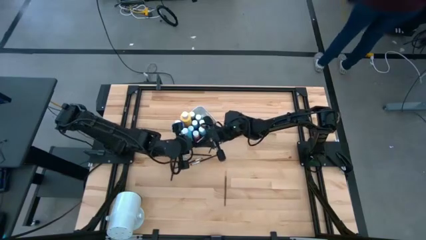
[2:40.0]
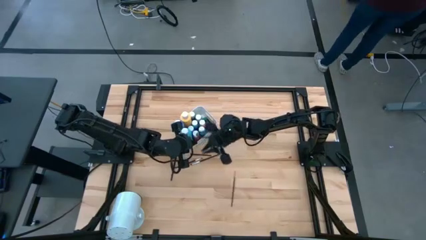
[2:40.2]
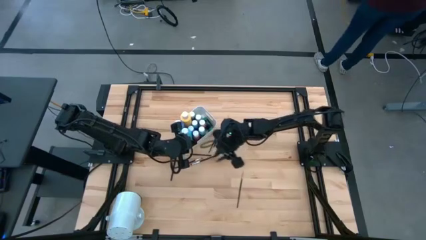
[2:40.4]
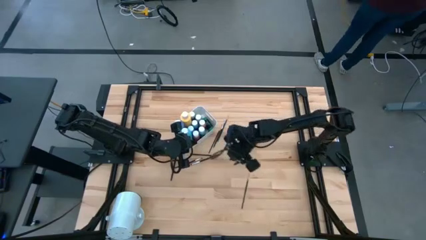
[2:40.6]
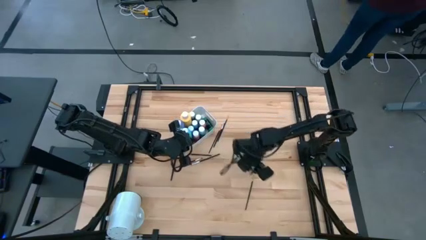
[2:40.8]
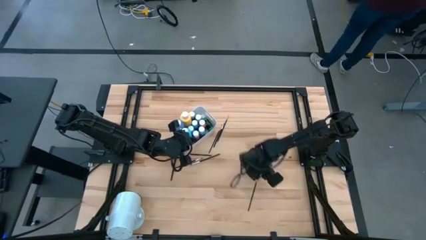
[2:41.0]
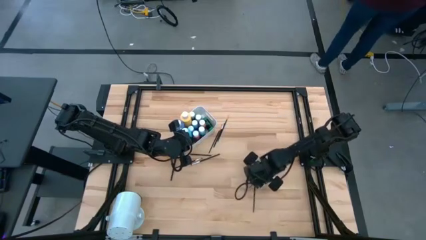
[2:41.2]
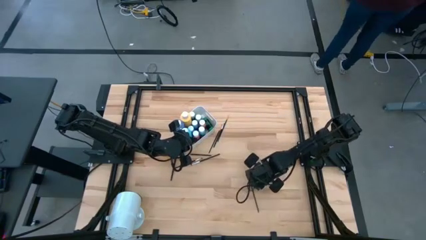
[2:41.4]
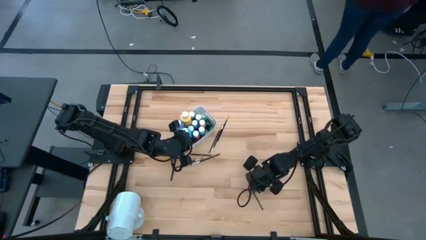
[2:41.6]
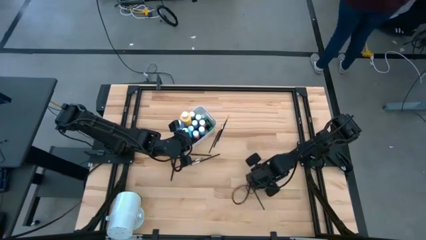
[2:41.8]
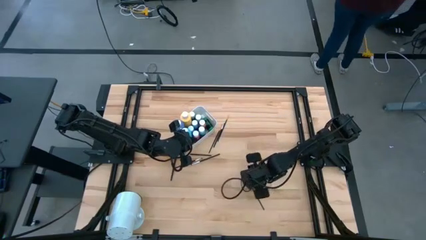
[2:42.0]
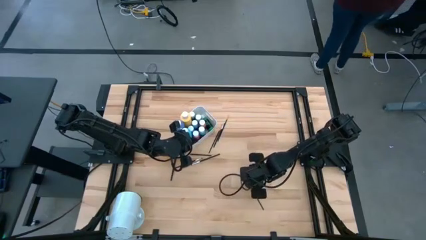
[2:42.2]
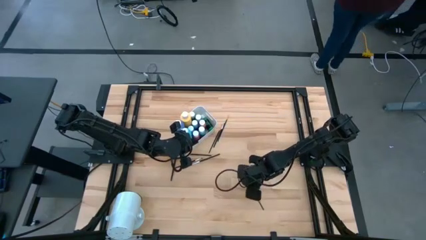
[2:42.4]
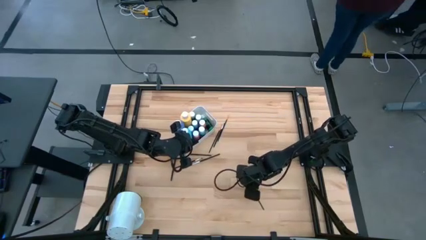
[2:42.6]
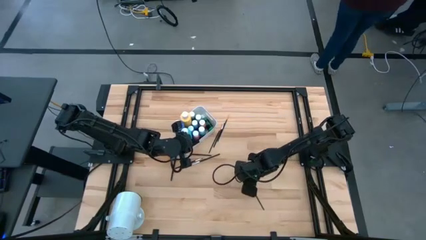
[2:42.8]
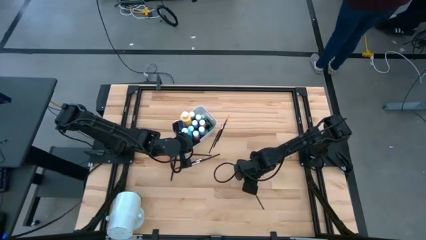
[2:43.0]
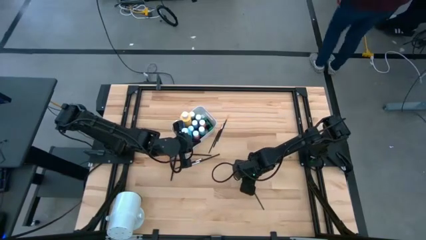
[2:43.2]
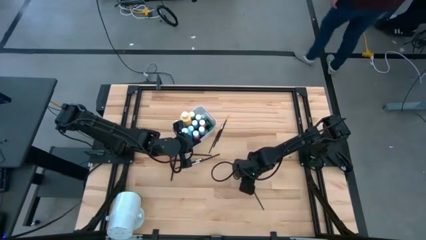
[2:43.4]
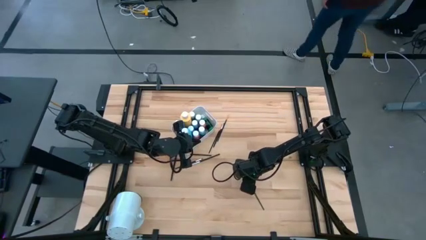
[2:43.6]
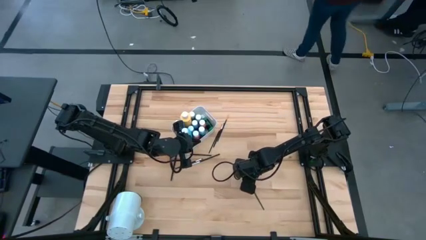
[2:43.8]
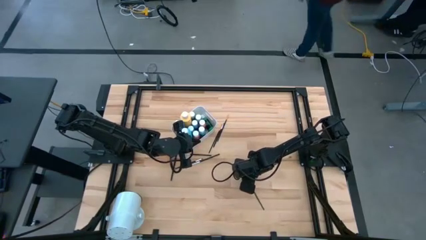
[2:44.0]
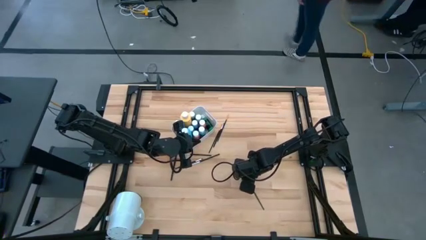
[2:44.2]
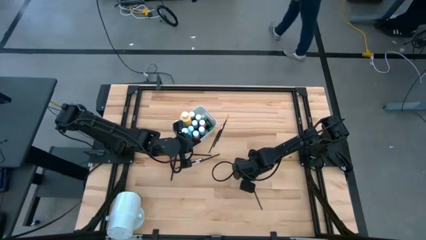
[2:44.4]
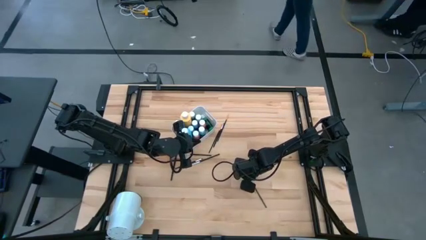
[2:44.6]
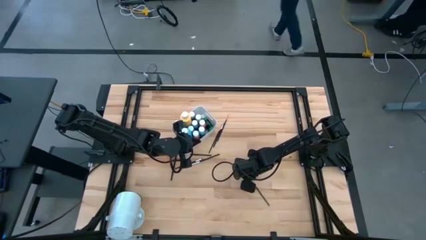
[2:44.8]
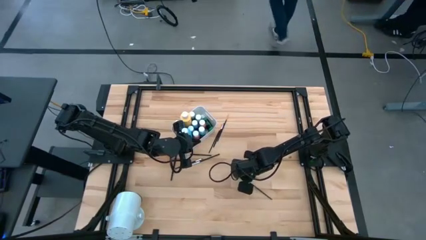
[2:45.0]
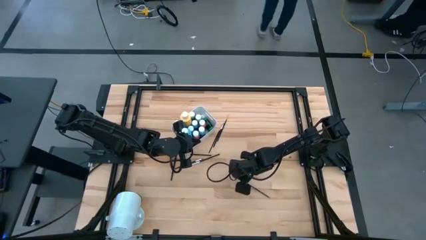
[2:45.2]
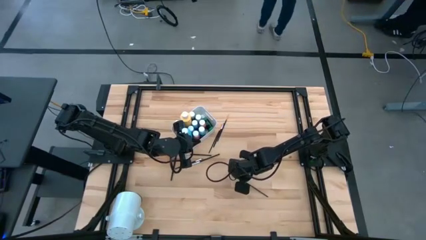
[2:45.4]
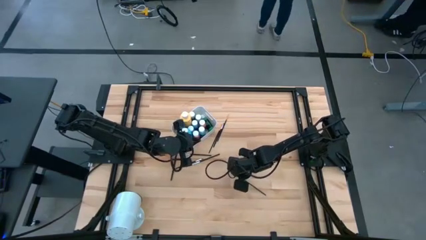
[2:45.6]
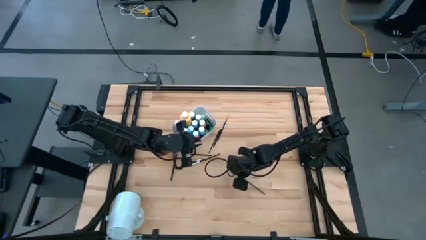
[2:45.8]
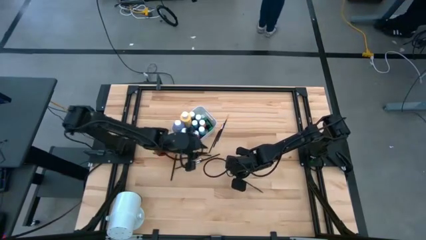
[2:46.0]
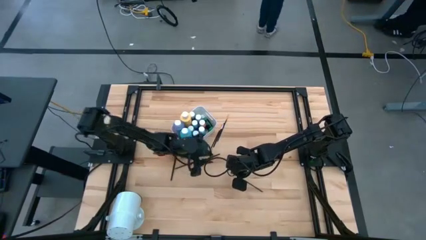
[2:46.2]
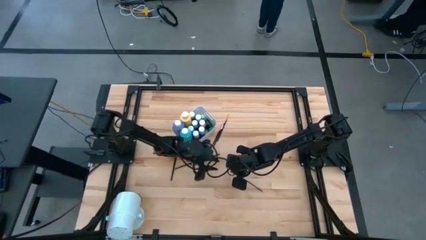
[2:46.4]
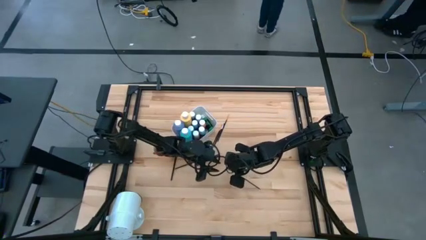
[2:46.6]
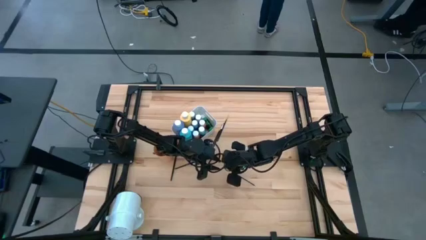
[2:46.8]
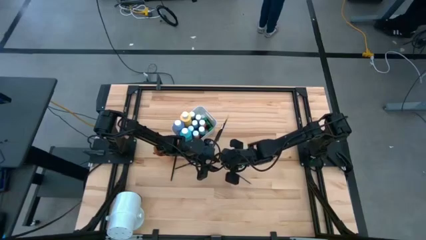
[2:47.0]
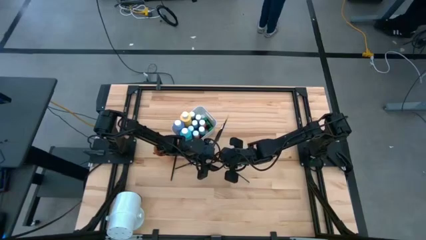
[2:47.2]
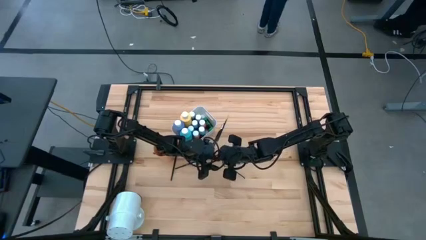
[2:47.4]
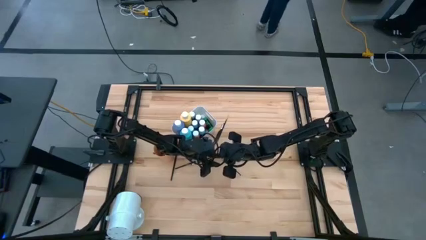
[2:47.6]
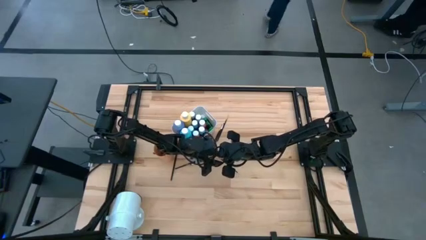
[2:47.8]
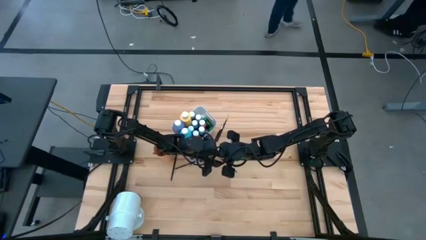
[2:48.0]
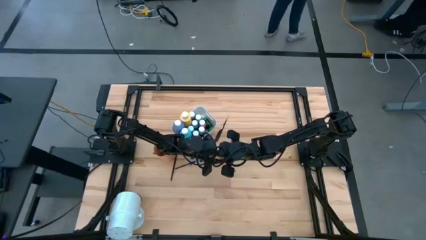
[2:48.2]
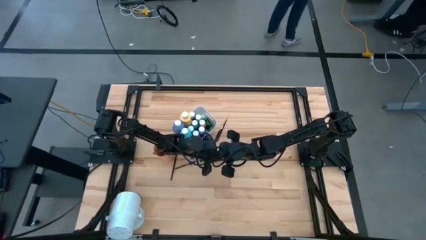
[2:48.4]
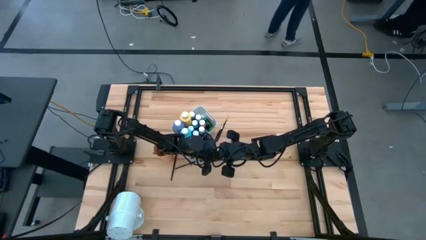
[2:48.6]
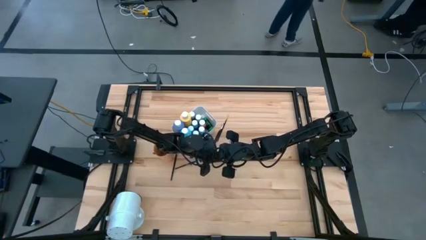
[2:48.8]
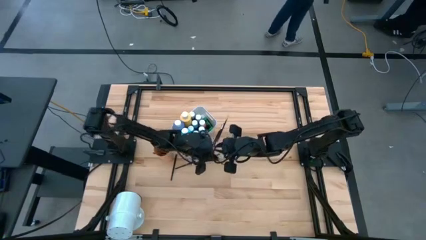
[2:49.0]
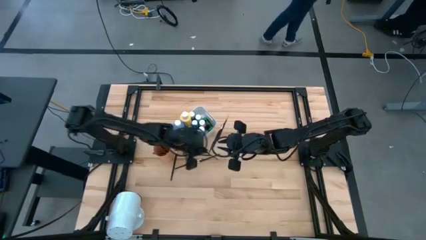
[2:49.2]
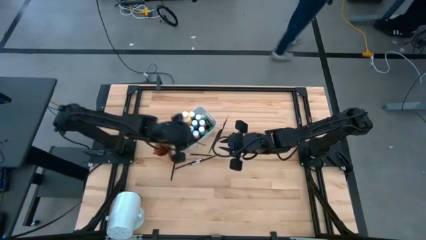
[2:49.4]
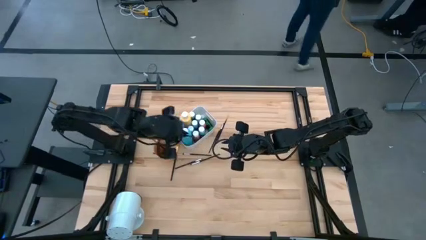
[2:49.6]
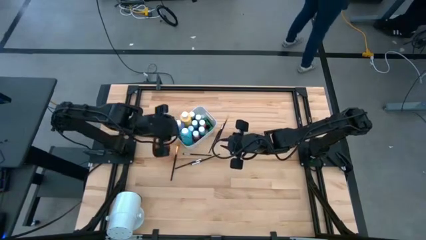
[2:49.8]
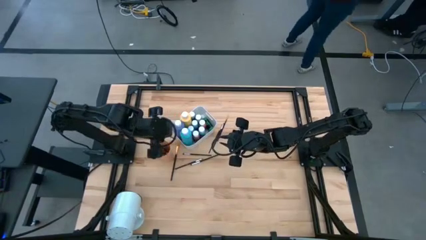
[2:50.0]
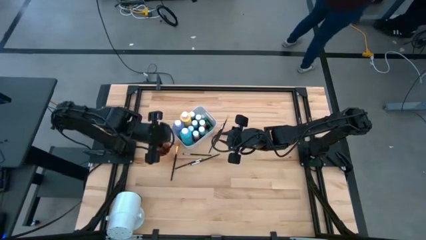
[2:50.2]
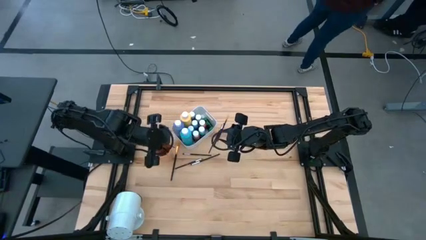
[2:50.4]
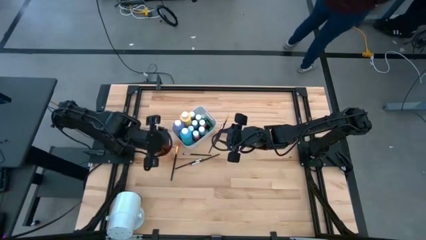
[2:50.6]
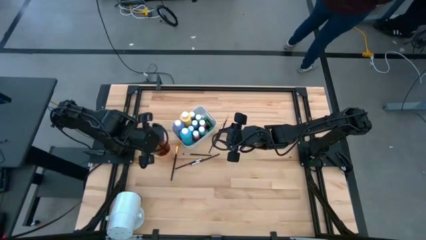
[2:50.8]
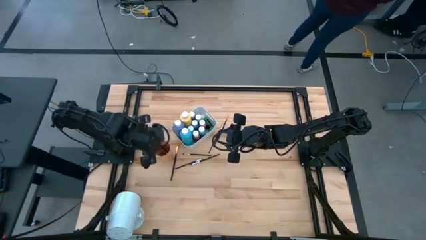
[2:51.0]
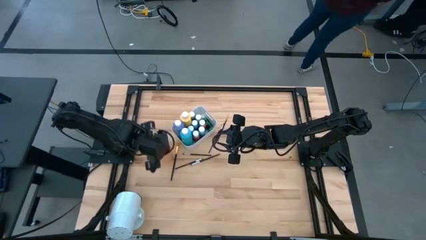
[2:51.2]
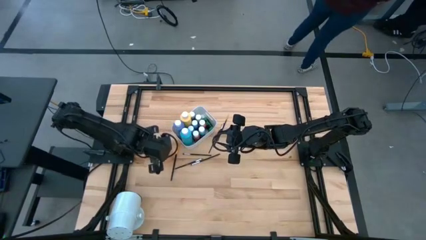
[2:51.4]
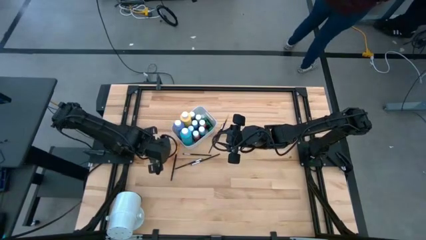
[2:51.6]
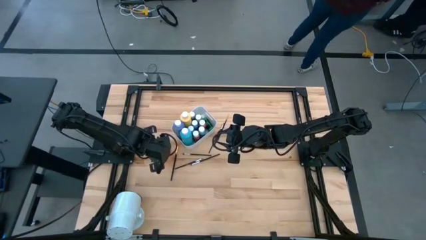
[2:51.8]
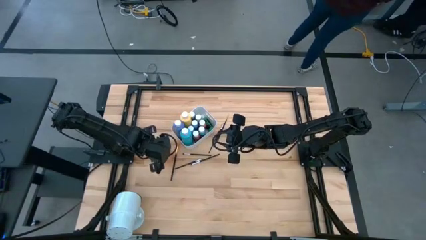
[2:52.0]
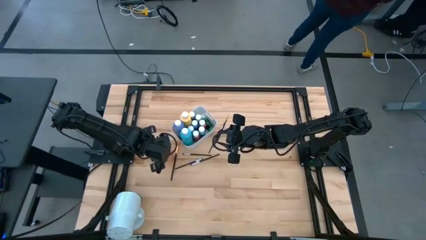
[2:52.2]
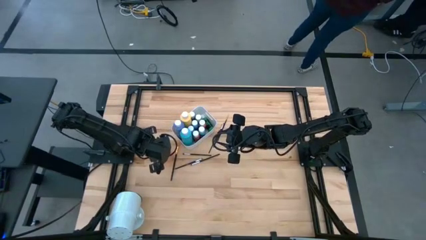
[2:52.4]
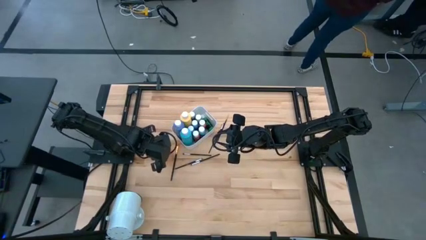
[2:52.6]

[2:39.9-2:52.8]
Task: Pick & Place Paint Supplies
Put the black gold paintbrush into the orange cup
